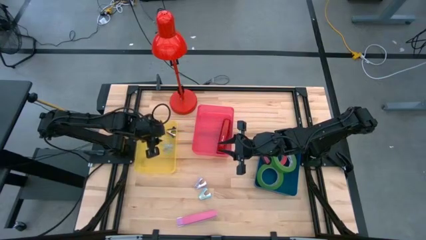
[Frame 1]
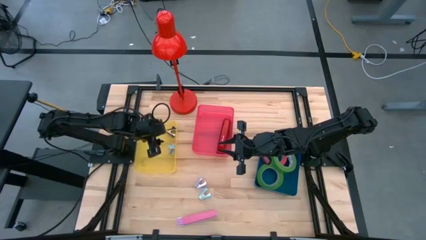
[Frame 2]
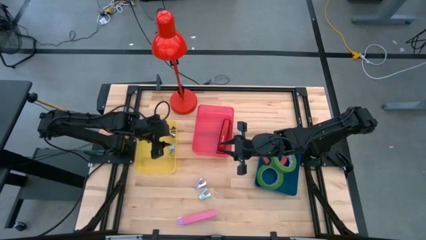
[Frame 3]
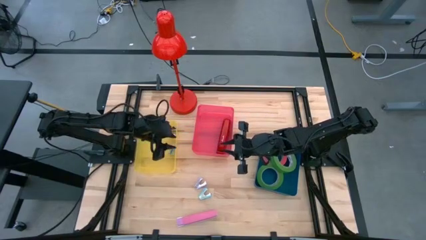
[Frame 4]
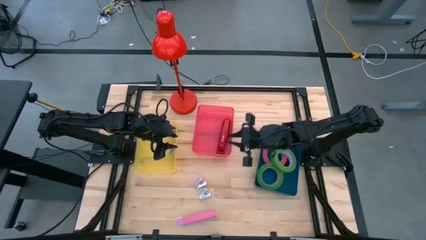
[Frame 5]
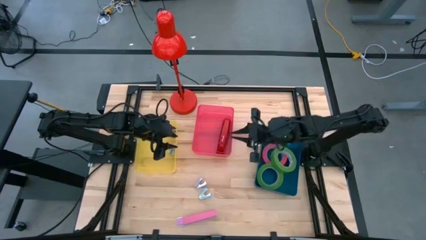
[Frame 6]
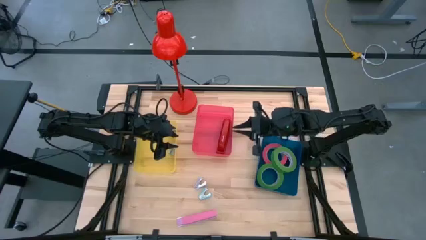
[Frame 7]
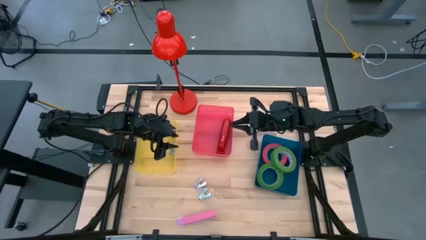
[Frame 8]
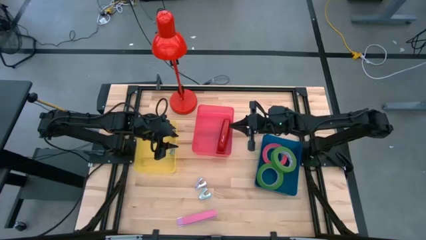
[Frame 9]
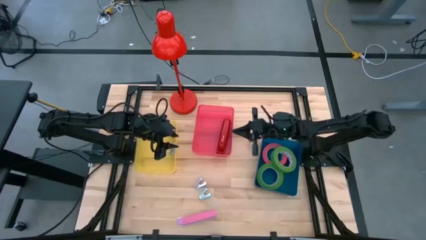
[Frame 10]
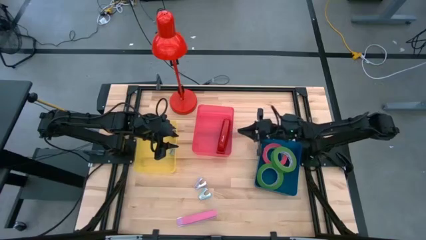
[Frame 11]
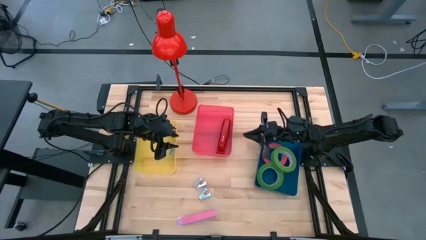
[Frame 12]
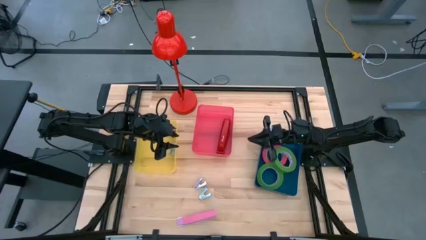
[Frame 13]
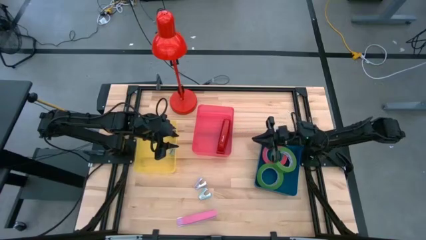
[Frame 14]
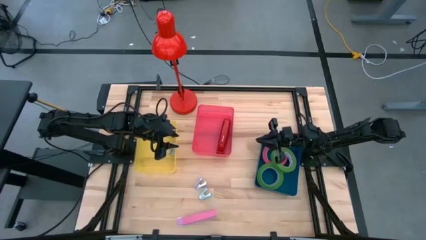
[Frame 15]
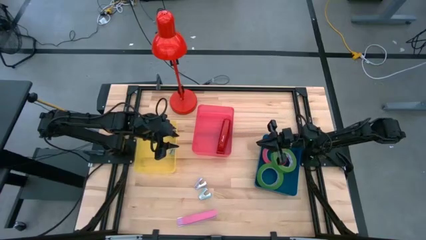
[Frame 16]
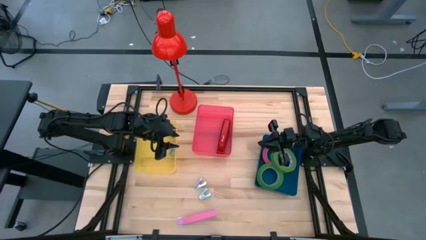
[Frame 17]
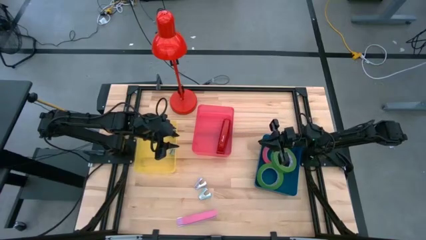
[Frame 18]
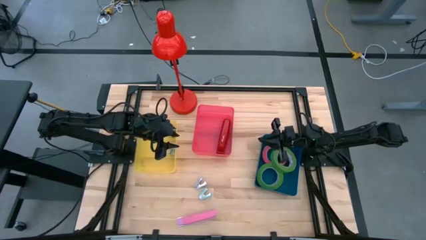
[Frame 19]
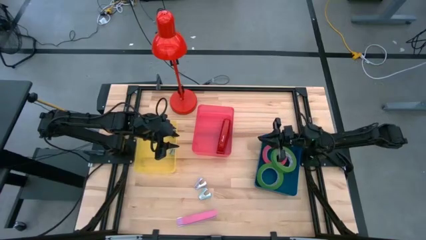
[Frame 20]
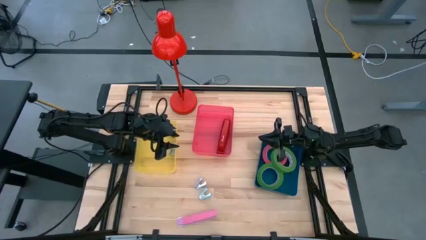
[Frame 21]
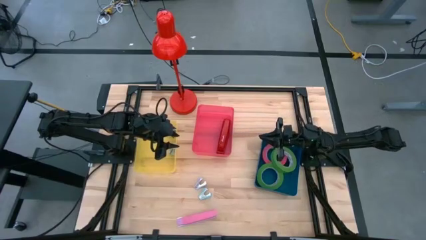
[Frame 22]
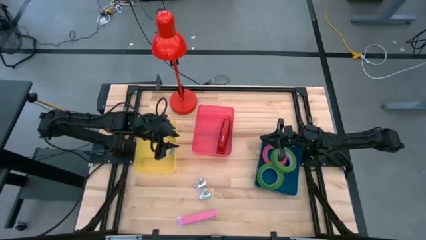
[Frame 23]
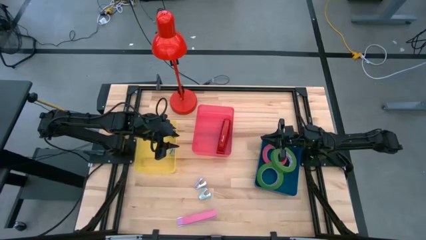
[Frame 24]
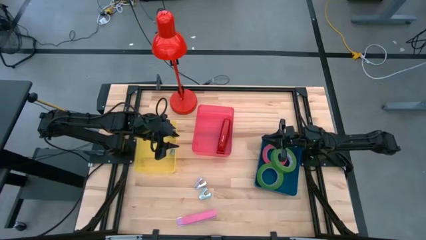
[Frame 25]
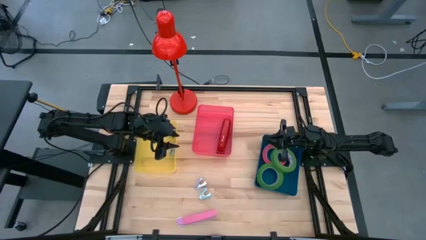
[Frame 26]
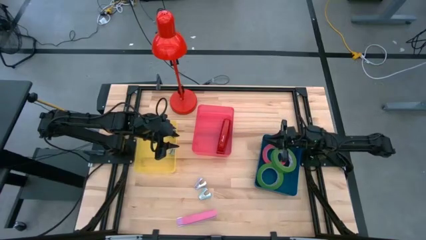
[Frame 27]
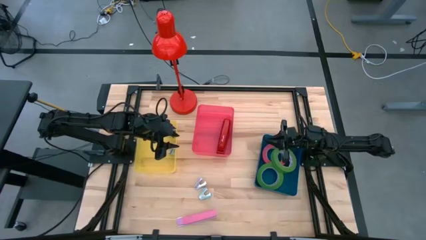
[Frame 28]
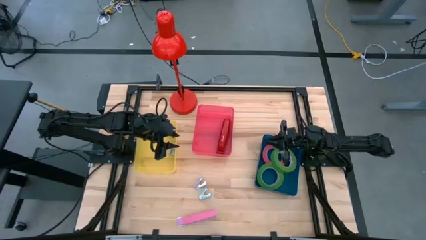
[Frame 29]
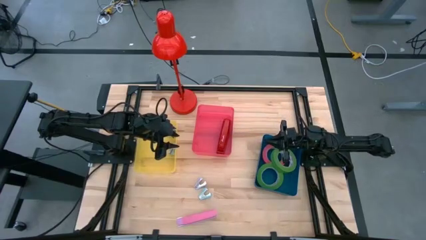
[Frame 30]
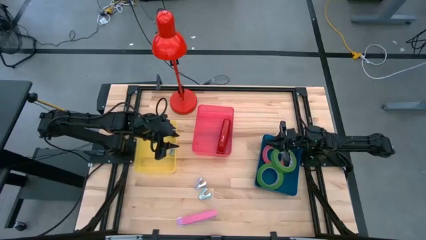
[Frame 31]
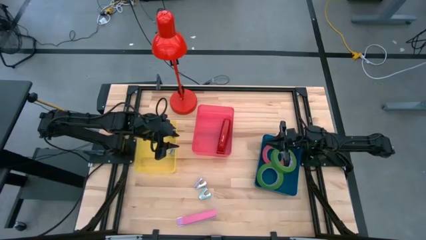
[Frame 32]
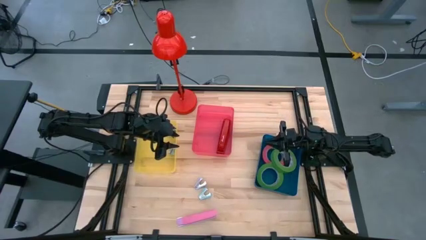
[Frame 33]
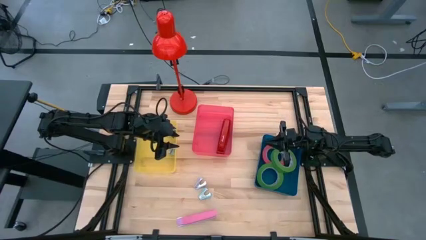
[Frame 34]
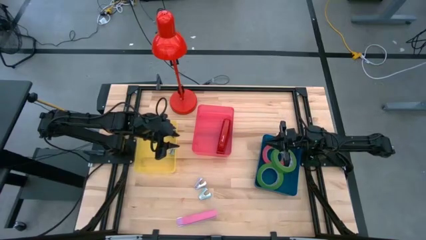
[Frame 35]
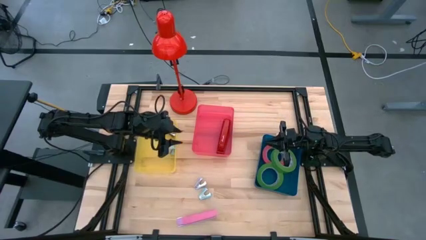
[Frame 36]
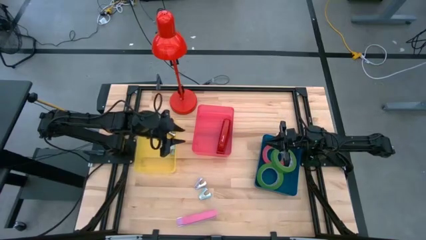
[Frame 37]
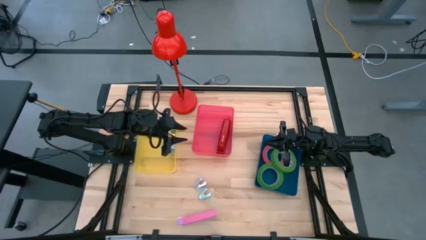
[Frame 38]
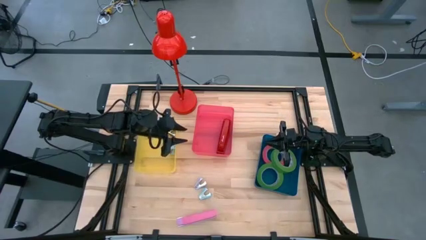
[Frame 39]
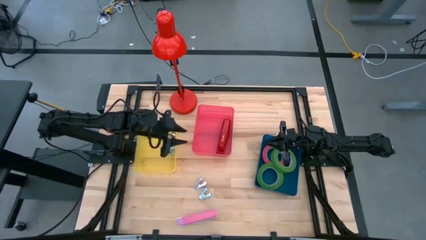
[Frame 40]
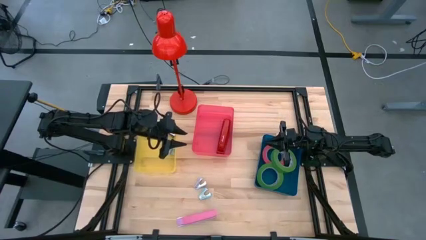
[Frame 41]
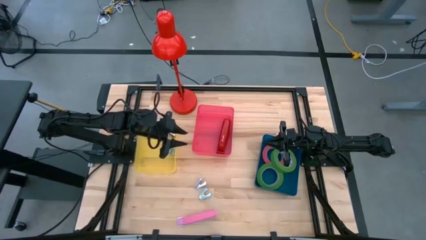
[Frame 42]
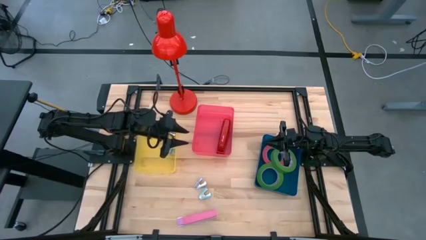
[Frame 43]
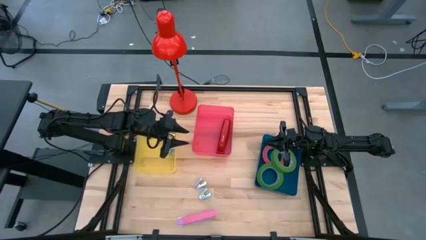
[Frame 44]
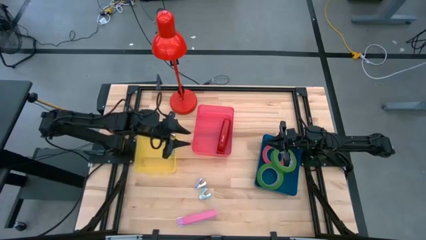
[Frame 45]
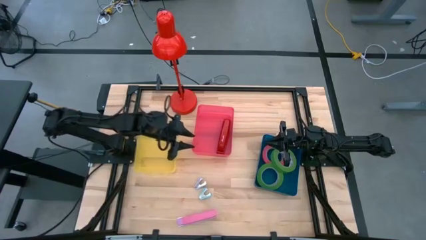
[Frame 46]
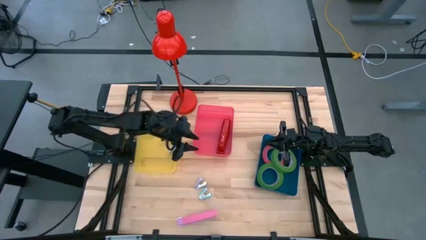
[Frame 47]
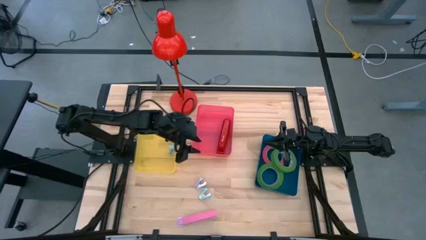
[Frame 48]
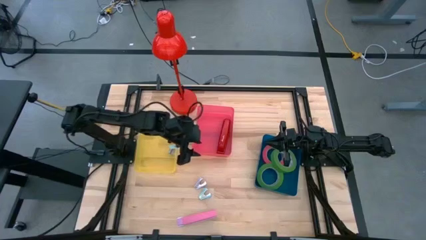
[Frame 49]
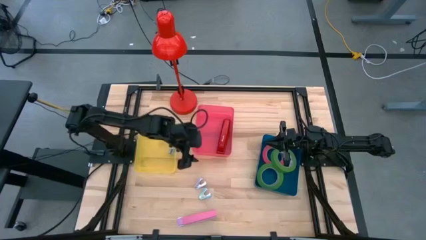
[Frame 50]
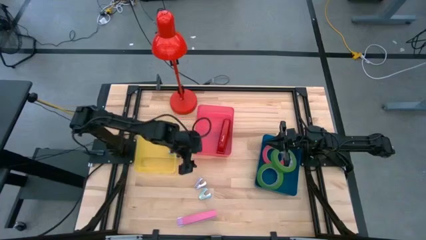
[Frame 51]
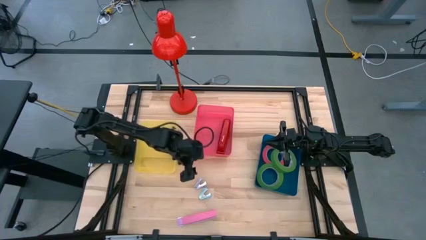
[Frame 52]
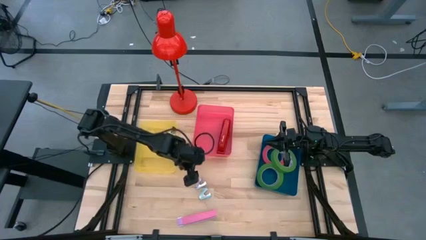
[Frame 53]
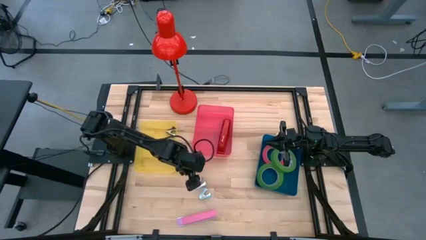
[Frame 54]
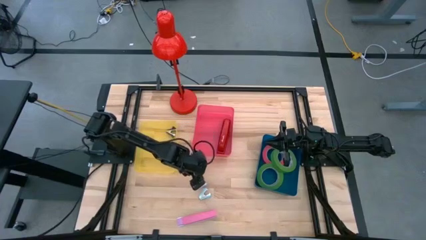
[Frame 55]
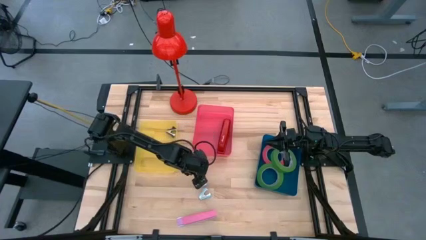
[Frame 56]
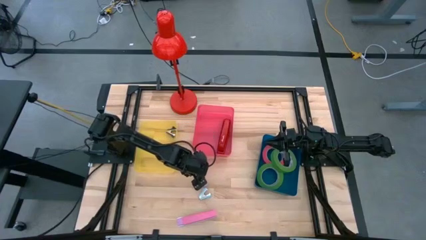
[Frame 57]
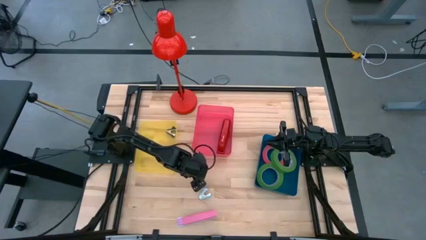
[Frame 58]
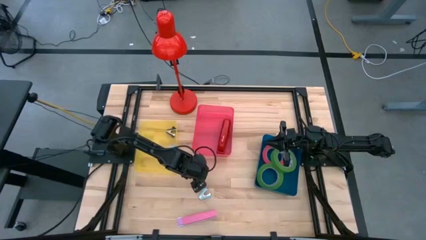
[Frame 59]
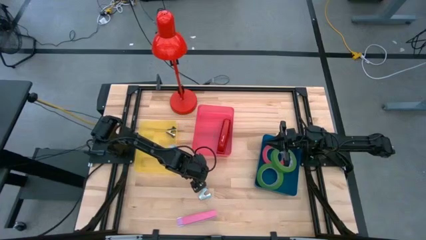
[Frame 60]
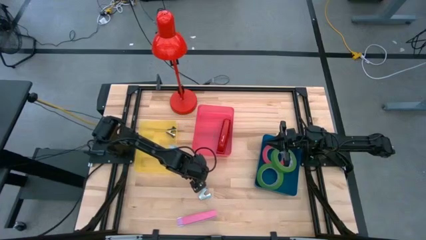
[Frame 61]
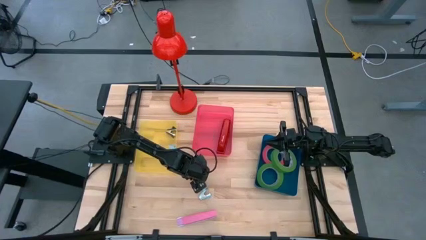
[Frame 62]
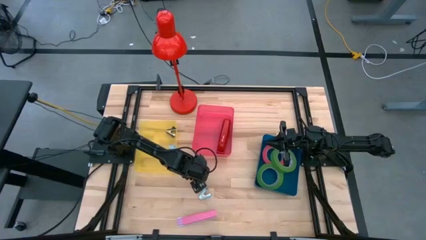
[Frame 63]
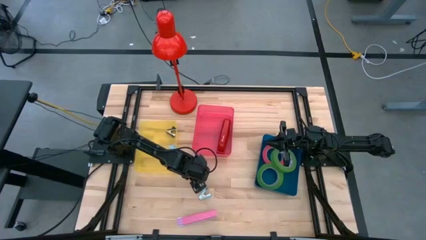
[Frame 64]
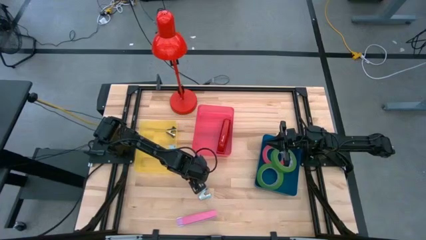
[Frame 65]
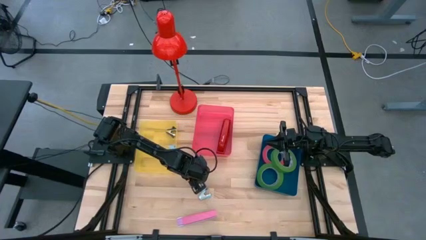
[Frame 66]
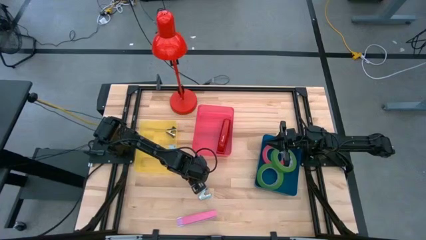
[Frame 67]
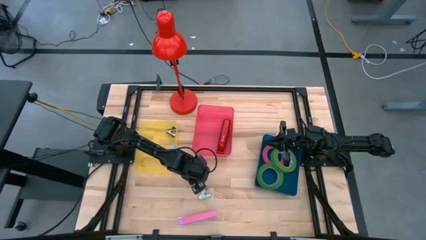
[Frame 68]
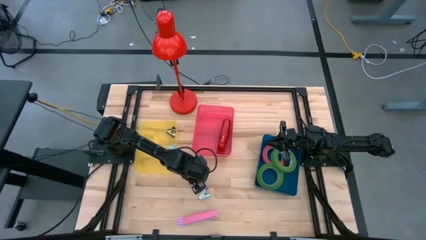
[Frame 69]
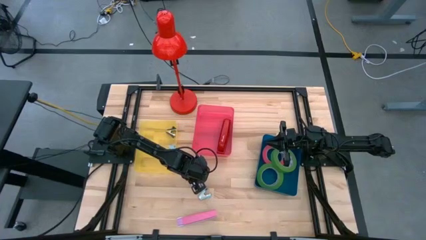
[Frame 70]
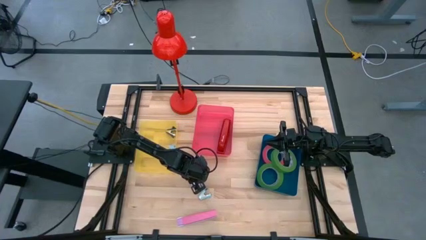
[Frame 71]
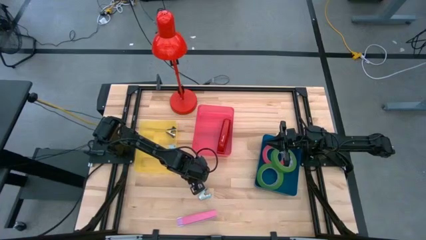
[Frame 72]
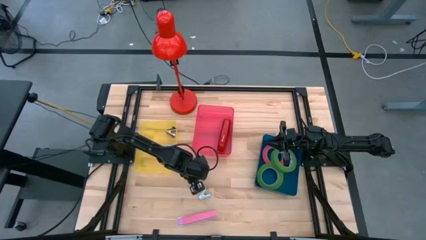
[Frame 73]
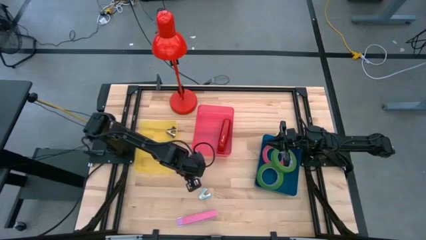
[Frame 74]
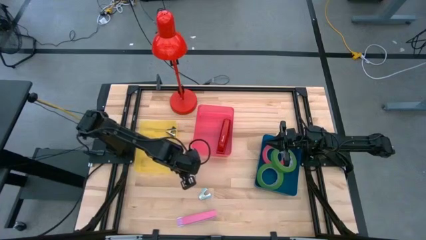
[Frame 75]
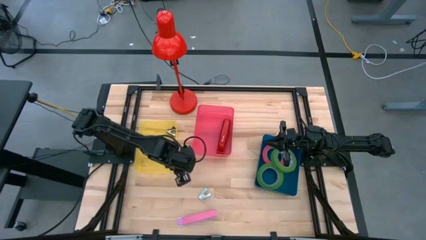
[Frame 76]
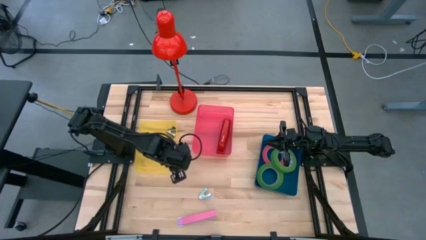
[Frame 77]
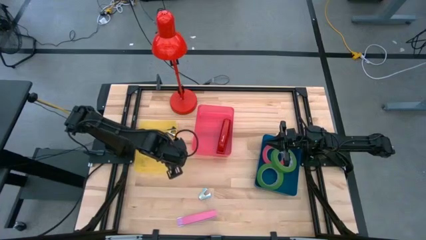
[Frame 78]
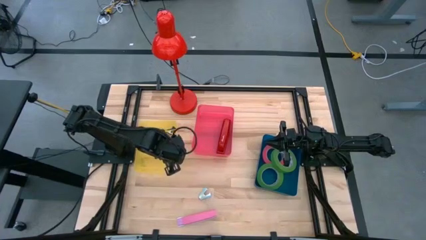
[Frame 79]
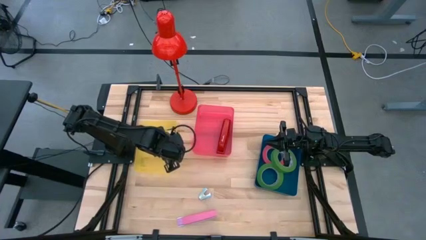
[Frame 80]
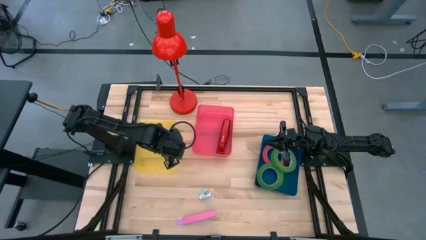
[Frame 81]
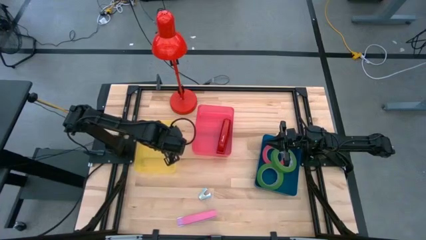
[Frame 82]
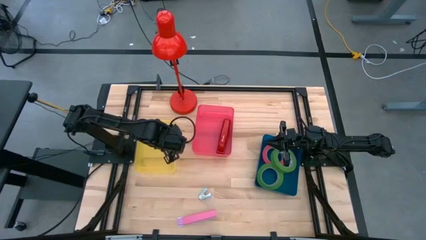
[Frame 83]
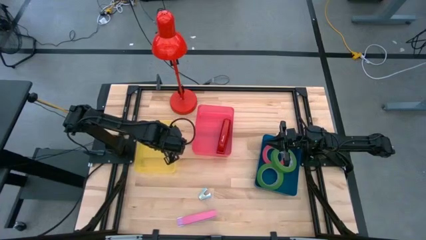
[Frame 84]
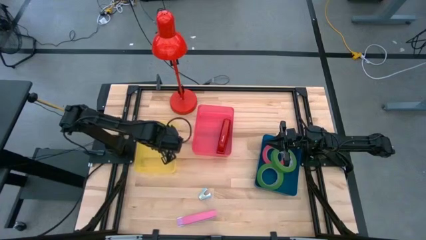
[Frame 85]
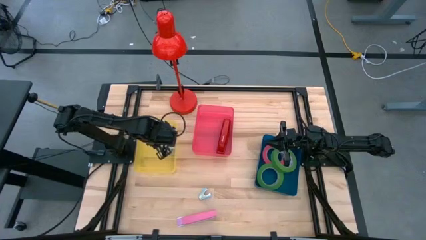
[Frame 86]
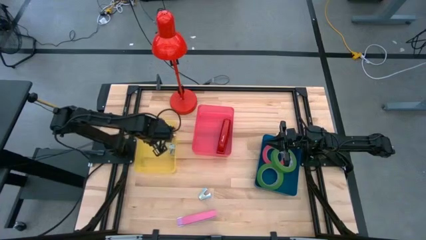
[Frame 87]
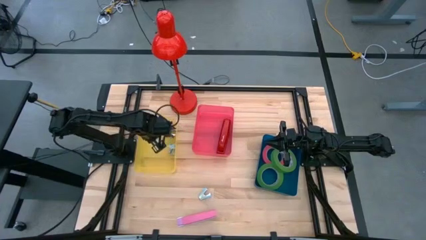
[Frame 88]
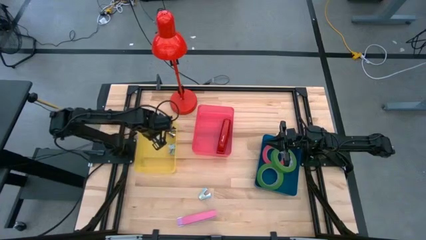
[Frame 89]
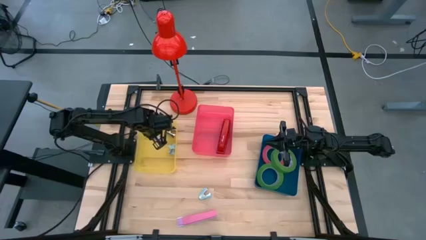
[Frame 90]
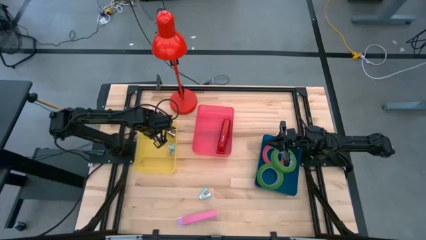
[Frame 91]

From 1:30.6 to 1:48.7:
Task: Pick and place Stapler, Stapler remover, tape
Put the purple staple remover into the yellow bin
